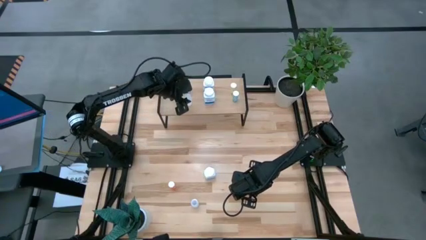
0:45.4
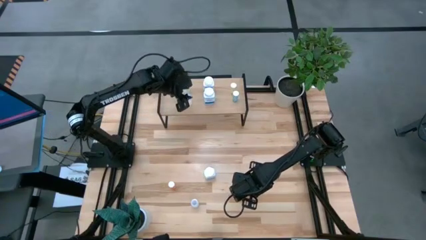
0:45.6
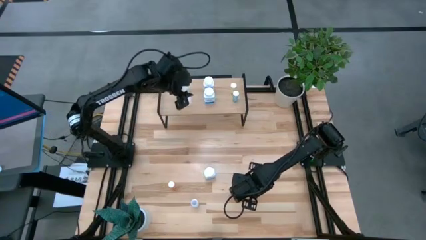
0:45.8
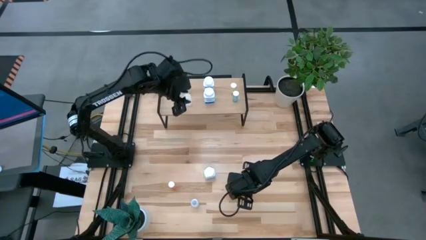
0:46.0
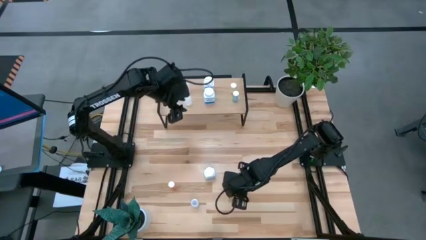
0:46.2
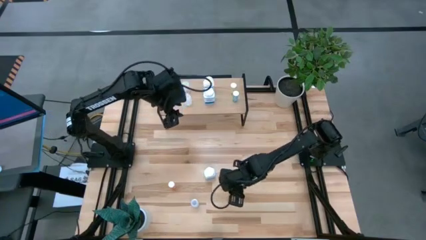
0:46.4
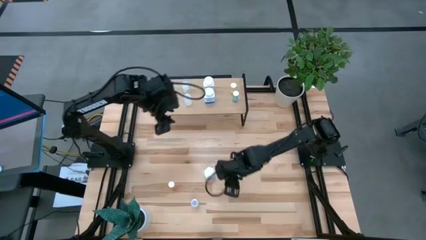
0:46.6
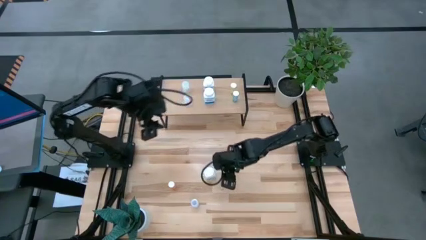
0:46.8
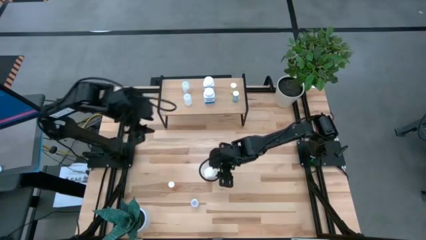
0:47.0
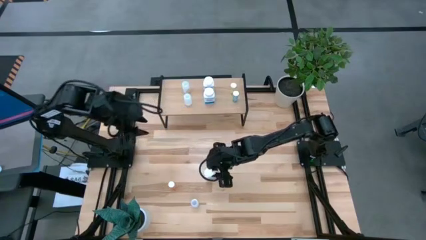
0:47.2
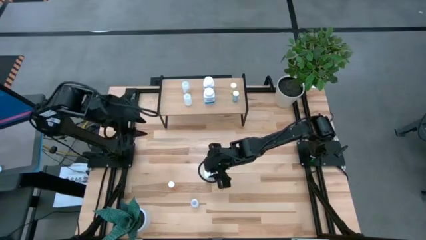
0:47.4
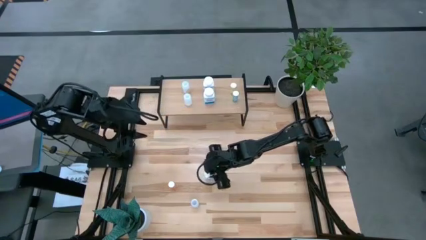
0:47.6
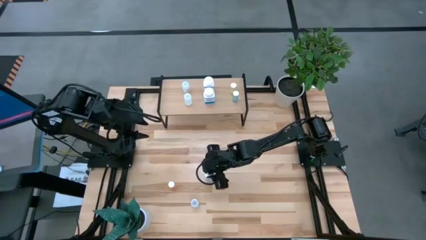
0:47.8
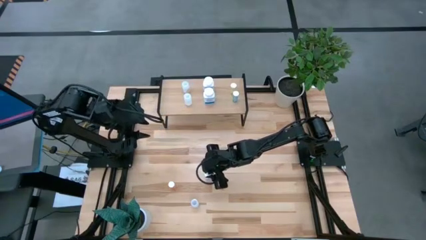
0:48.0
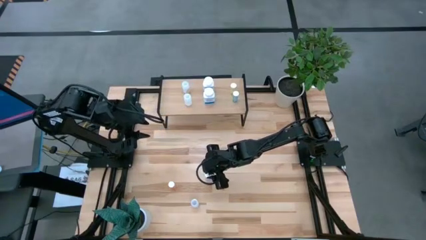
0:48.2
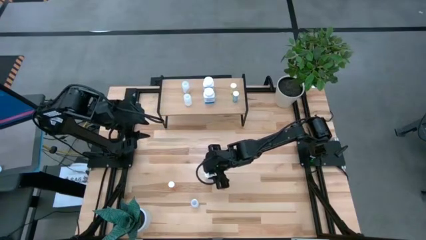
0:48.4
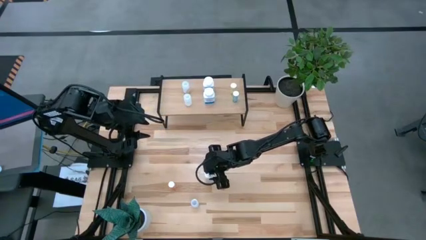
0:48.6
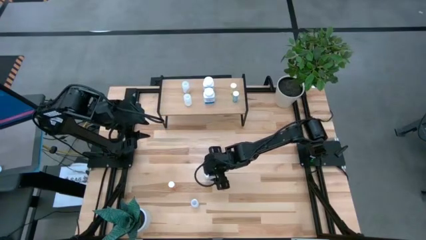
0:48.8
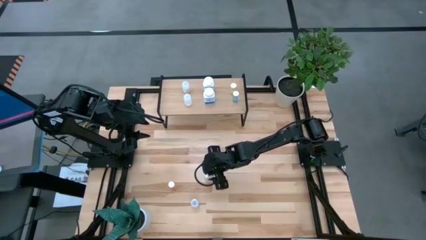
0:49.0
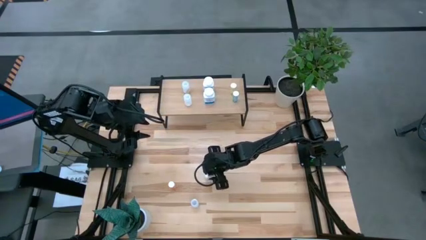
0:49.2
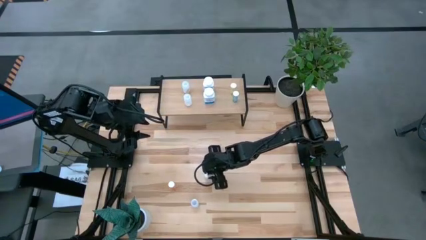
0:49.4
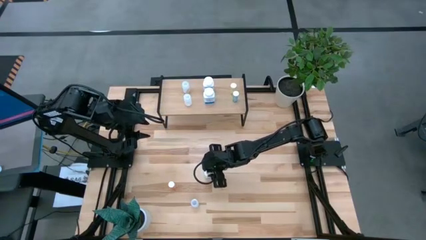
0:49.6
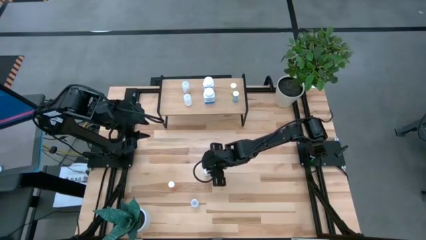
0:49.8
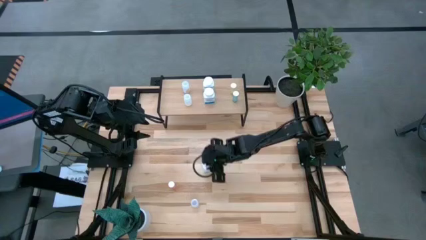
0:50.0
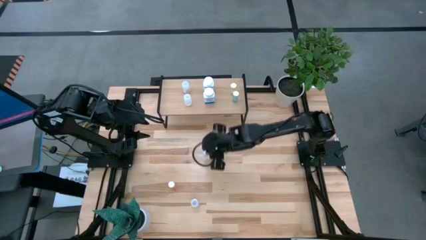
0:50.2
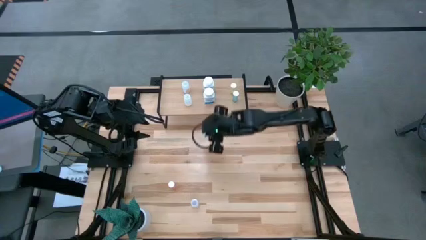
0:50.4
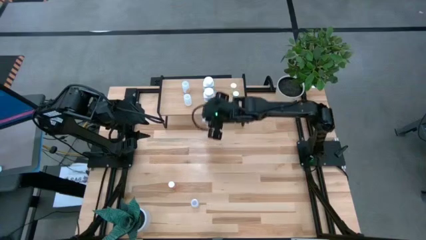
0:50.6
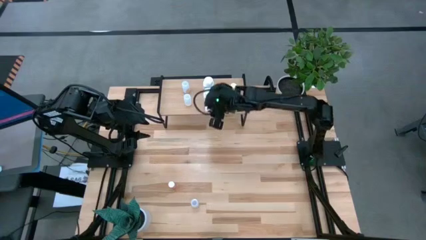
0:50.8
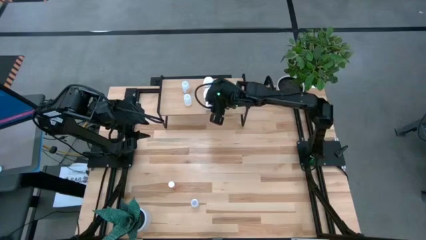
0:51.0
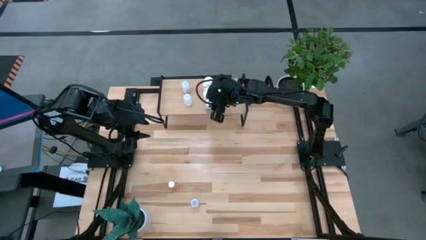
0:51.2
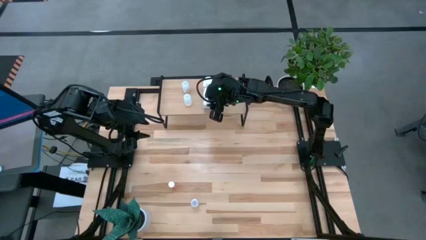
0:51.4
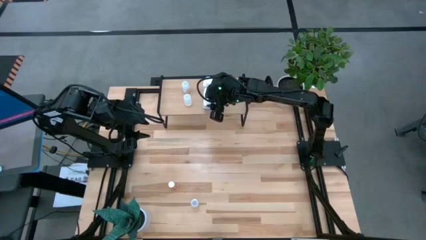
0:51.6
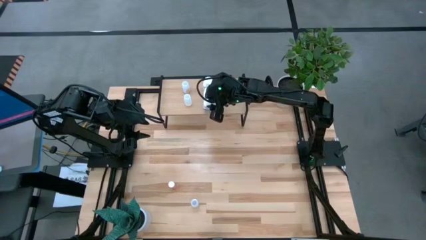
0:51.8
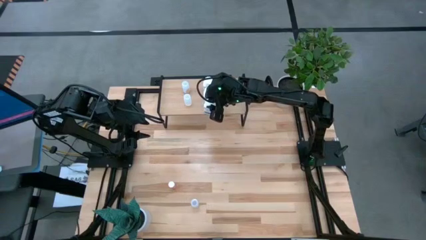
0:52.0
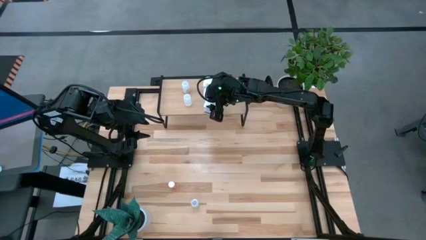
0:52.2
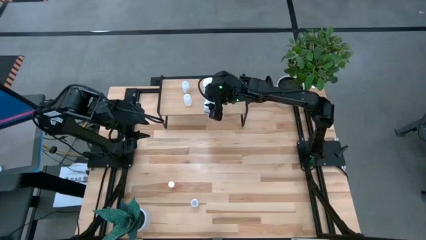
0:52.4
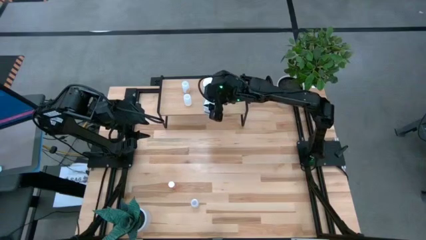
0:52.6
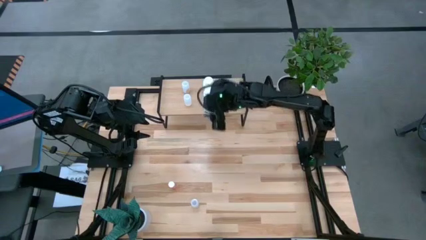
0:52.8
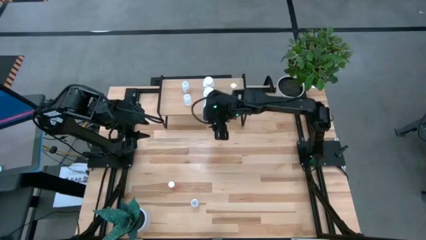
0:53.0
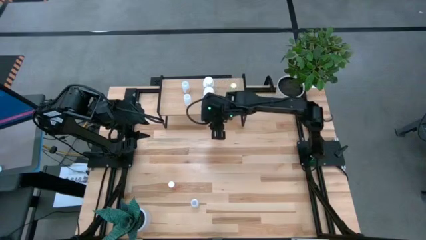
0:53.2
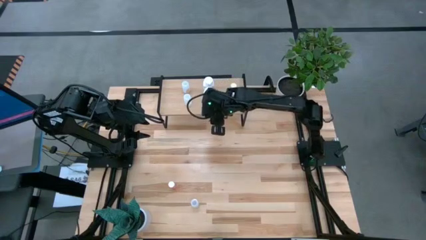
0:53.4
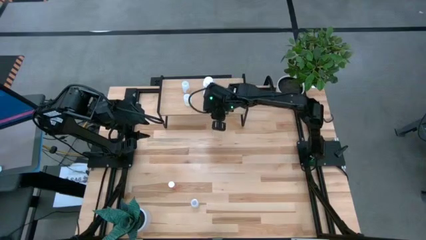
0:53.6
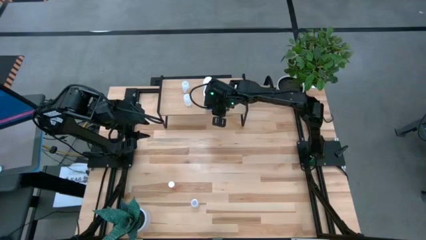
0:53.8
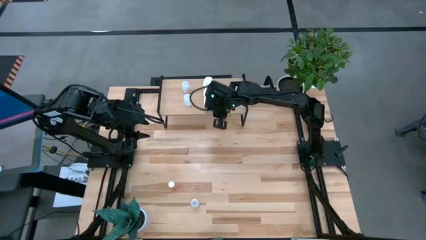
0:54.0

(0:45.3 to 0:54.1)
Task: Pick and place medicine bottles onto shelf by color
Put the white blue pill bottle on the shelf and align it with the white blue pill bottles

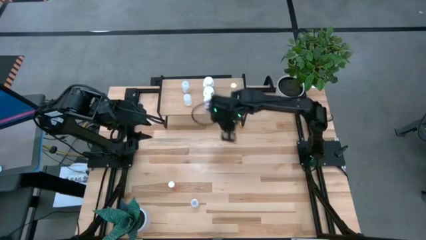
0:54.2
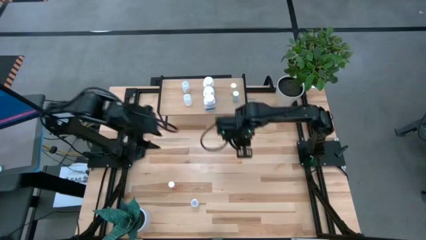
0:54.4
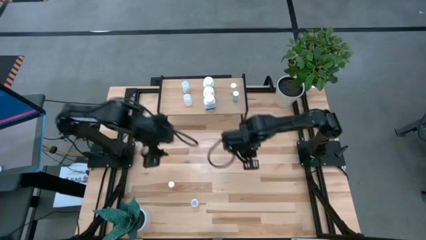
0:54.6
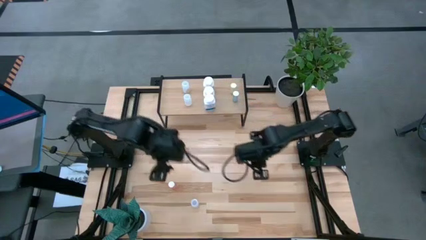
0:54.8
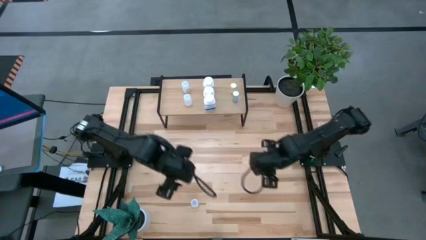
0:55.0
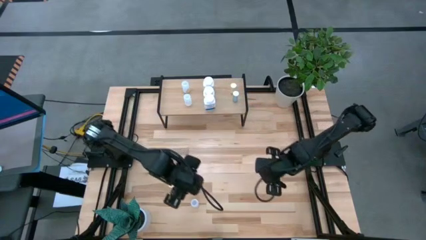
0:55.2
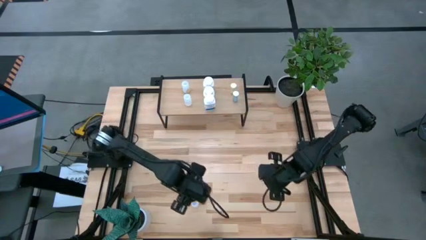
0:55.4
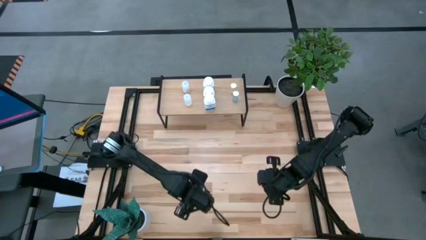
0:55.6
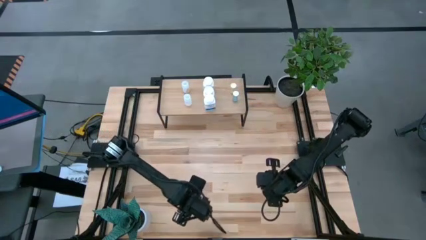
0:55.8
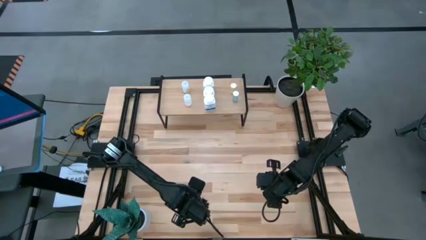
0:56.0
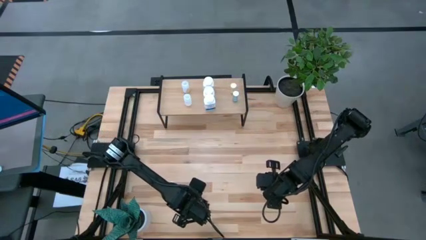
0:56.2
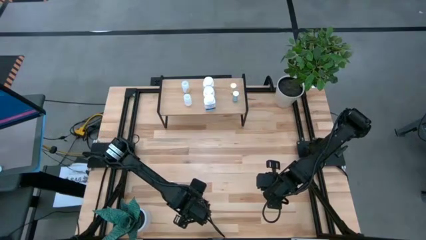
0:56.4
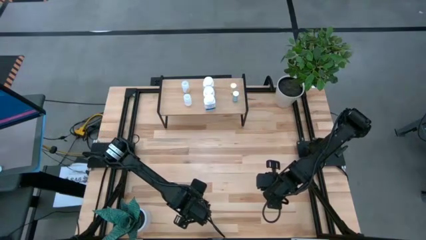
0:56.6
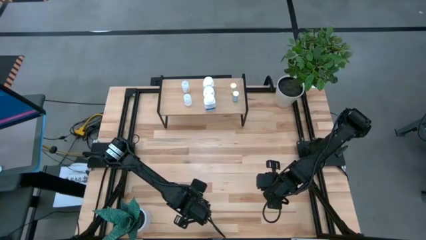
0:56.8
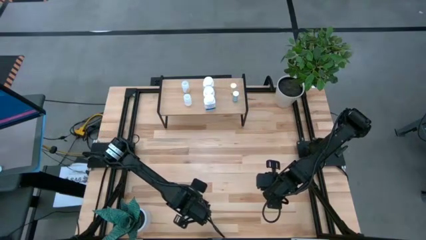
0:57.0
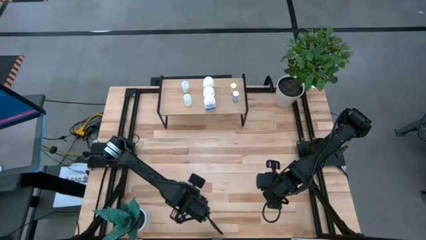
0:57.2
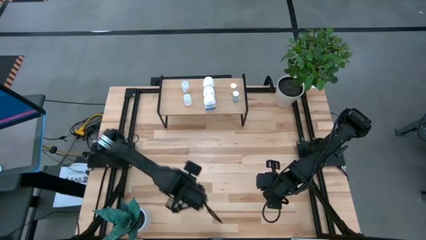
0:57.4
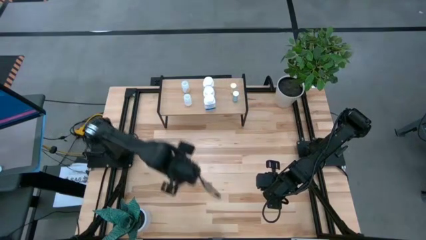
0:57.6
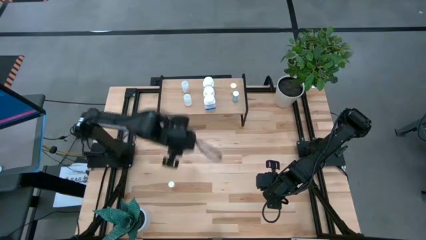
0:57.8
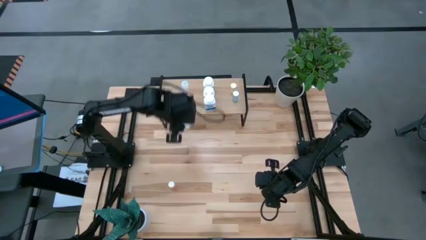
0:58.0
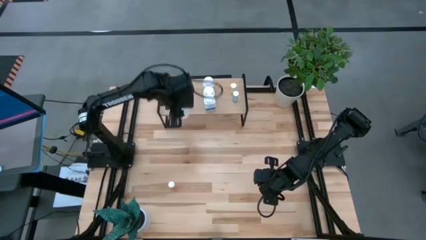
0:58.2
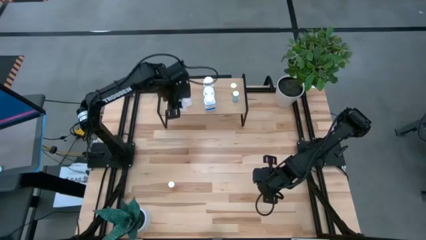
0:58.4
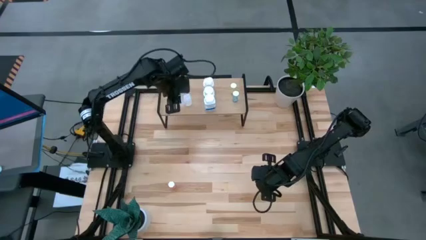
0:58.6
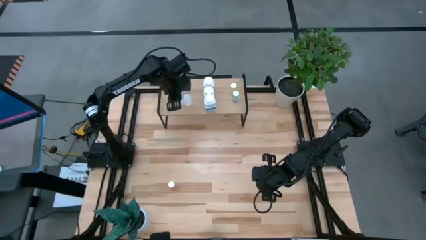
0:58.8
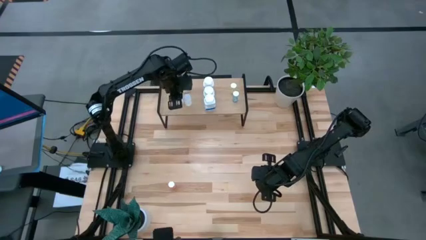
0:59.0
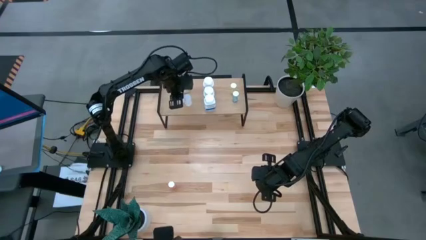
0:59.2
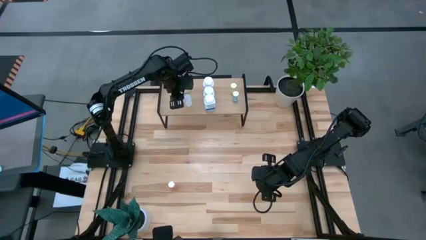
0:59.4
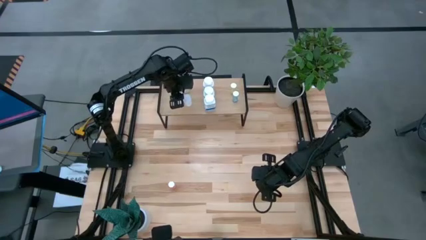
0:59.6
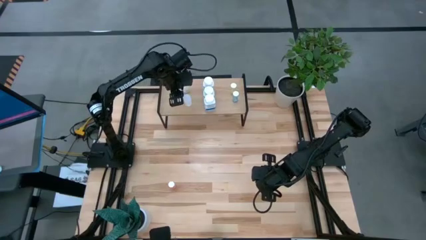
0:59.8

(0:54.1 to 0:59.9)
Put the white pill bottle on the shelf

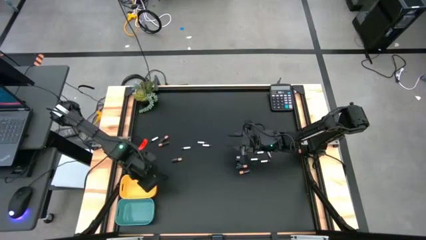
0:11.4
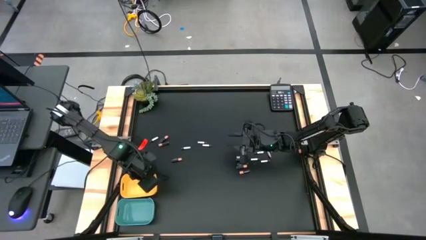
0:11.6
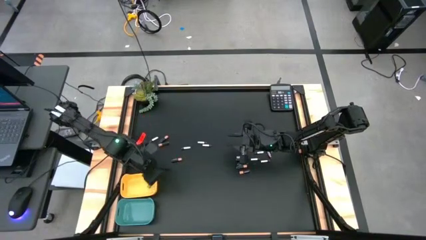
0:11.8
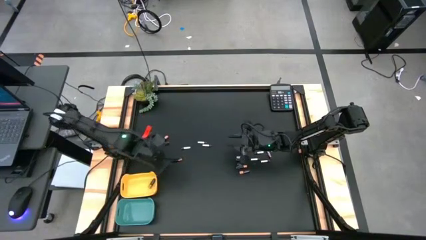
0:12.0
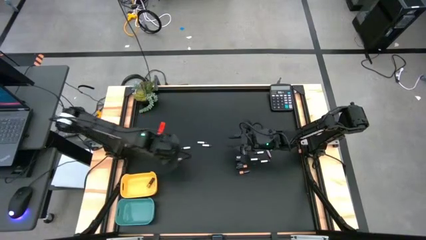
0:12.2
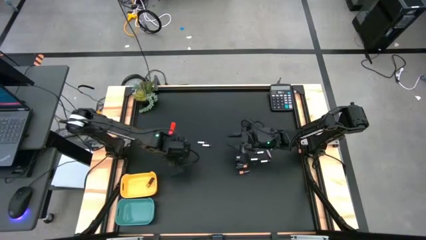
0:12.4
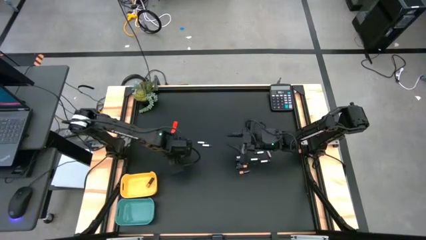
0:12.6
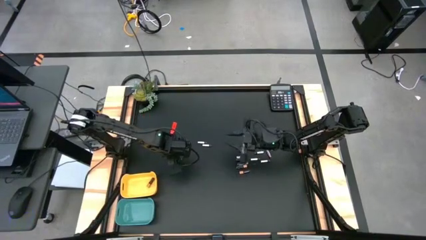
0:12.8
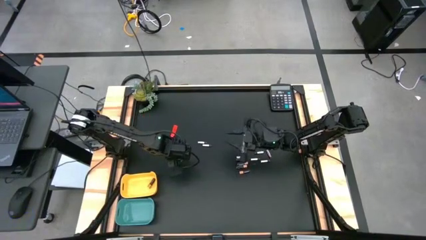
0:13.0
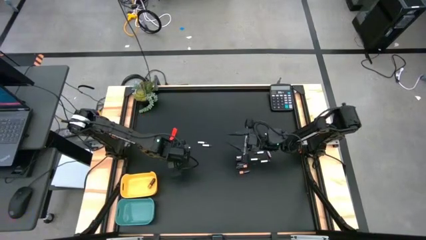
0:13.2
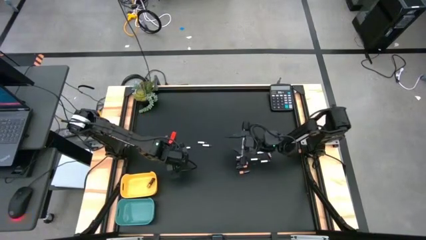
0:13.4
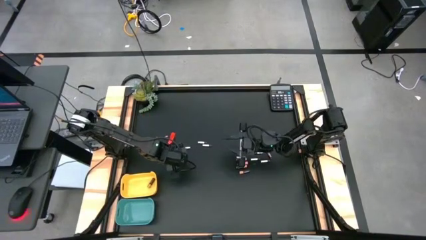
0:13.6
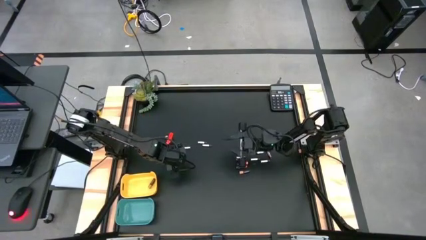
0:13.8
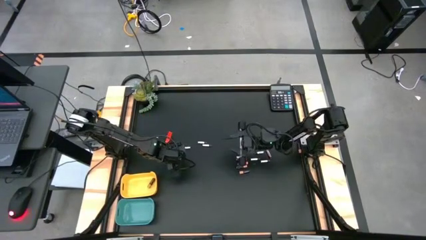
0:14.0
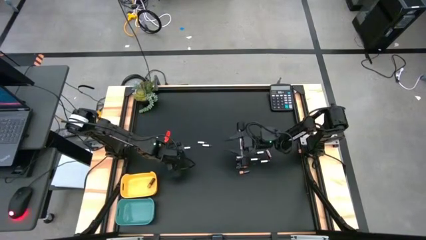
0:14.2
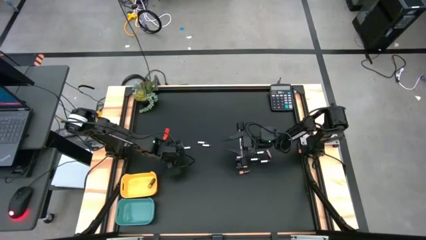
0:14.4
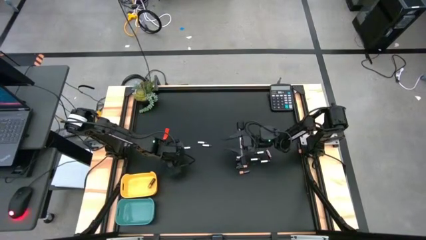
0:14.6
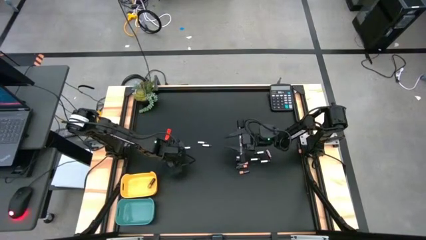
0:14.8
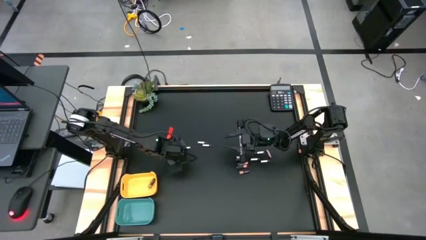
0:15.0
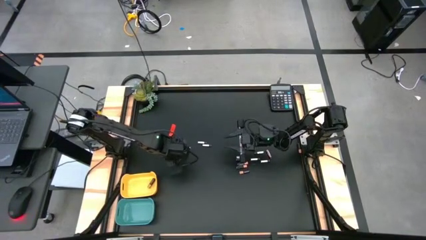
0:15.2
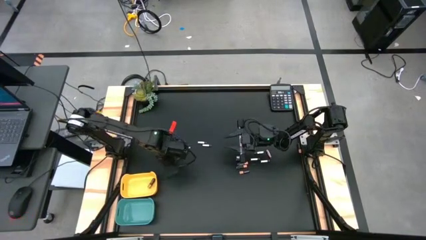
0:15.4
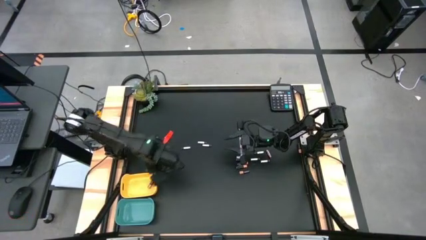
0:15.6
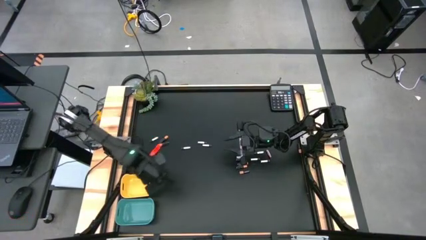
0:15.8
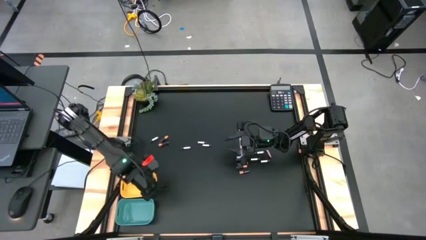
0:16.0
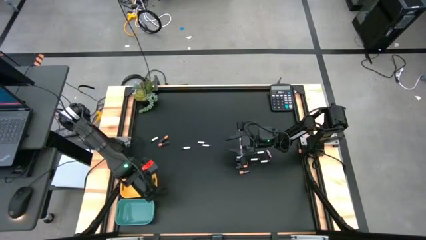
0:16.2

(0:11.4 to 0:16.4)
Task: Sort batteries
Put the black battery into the yellow bin
